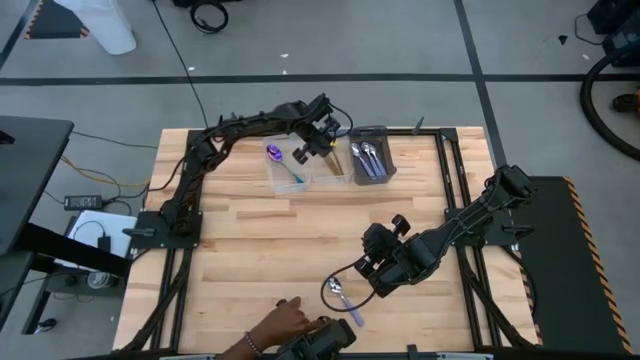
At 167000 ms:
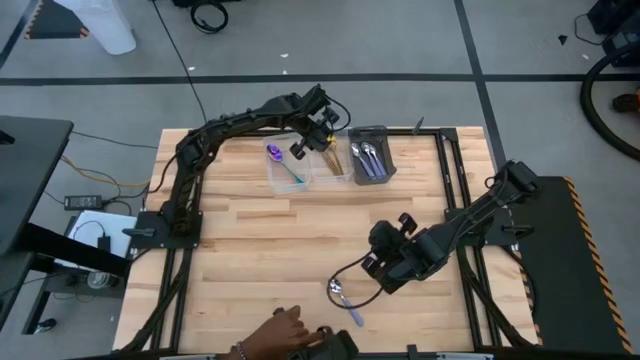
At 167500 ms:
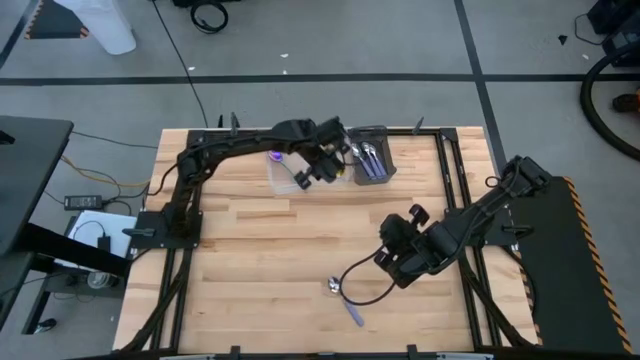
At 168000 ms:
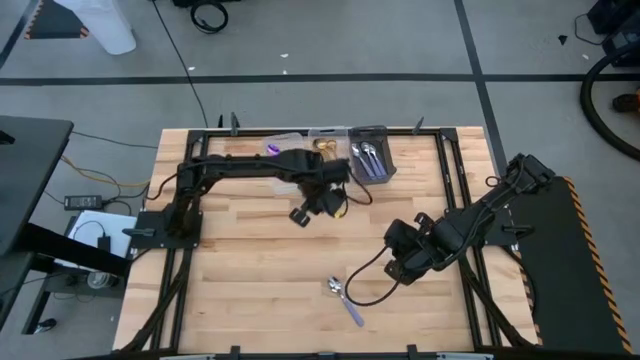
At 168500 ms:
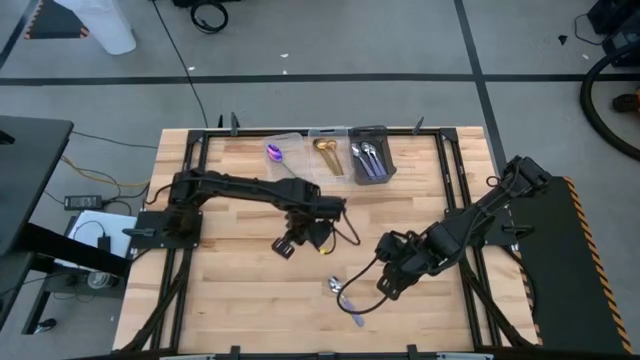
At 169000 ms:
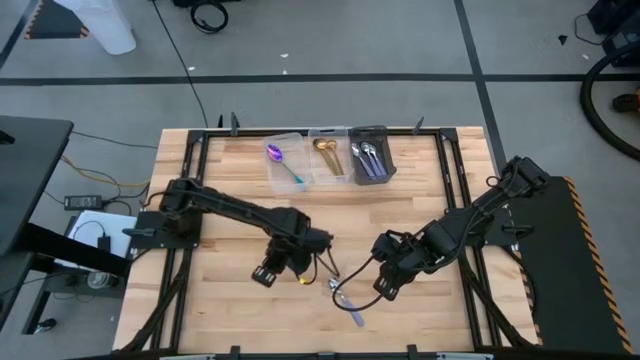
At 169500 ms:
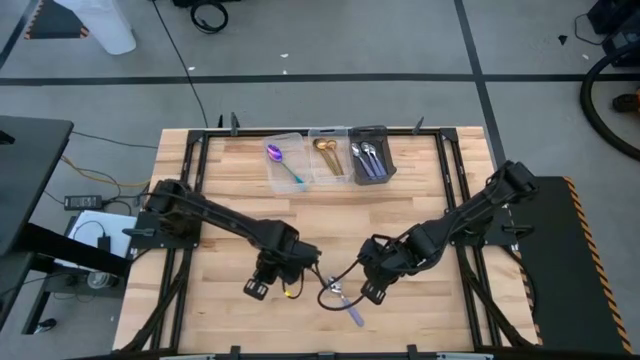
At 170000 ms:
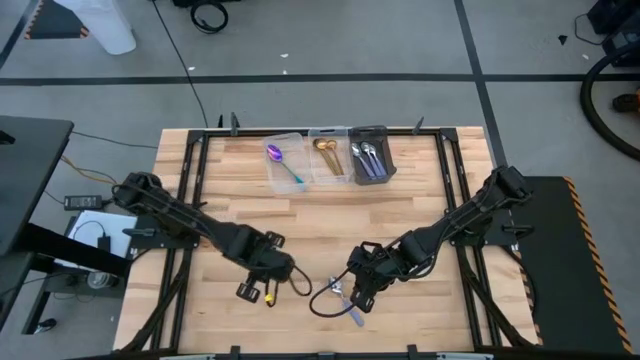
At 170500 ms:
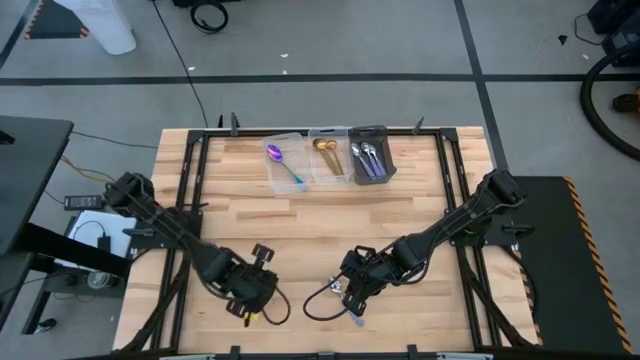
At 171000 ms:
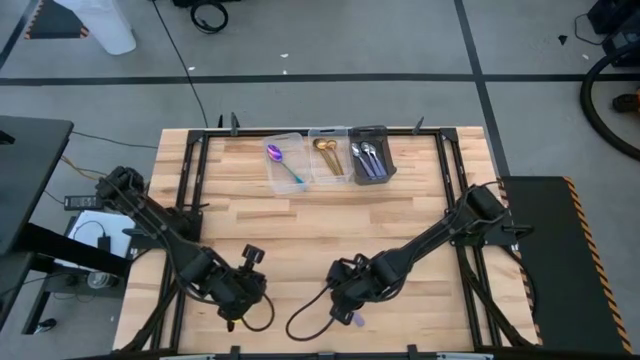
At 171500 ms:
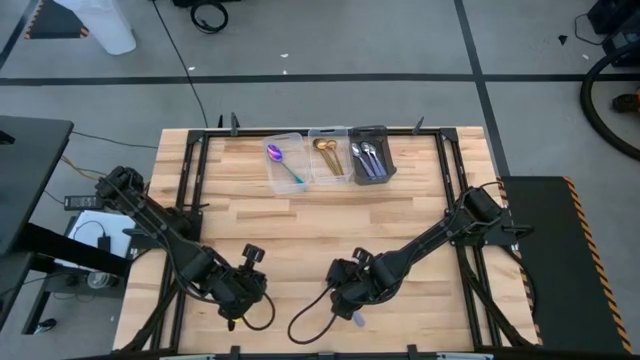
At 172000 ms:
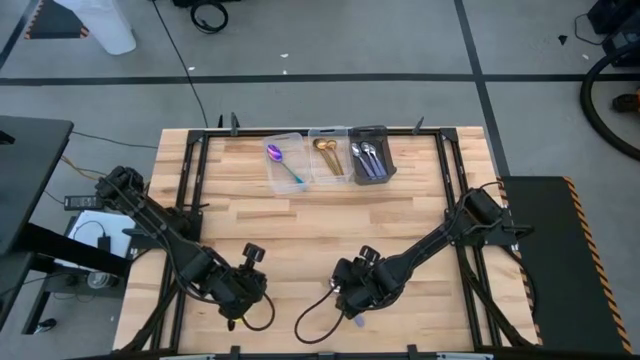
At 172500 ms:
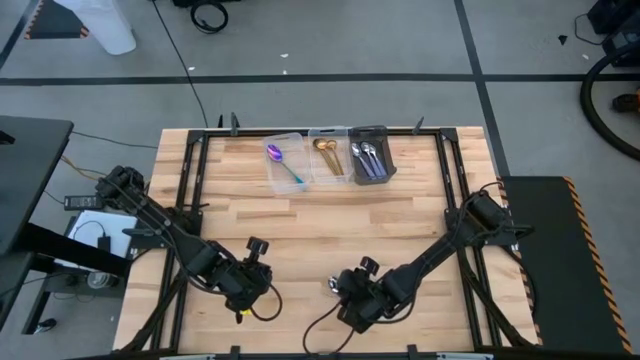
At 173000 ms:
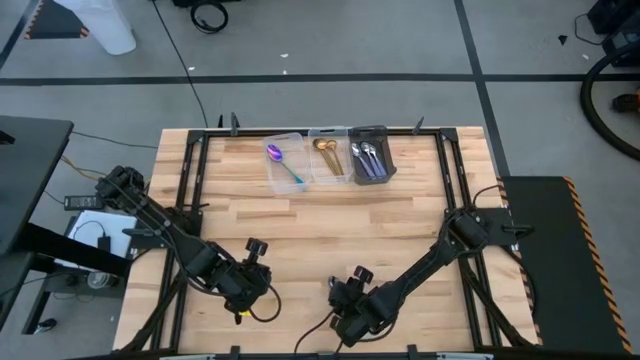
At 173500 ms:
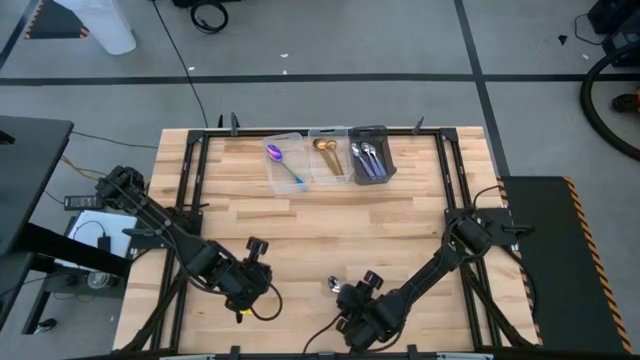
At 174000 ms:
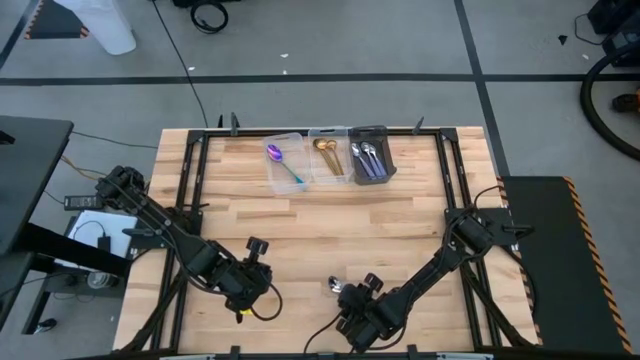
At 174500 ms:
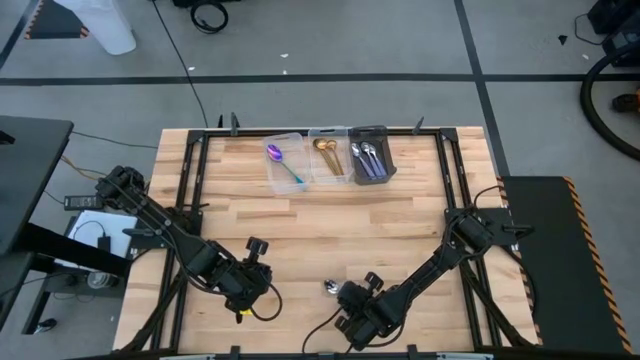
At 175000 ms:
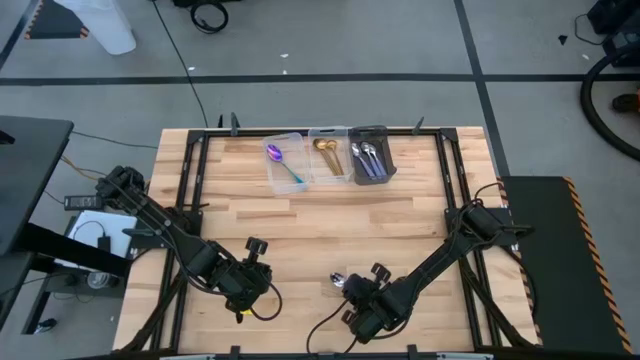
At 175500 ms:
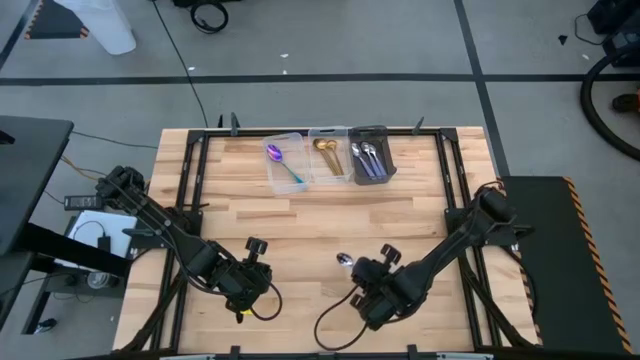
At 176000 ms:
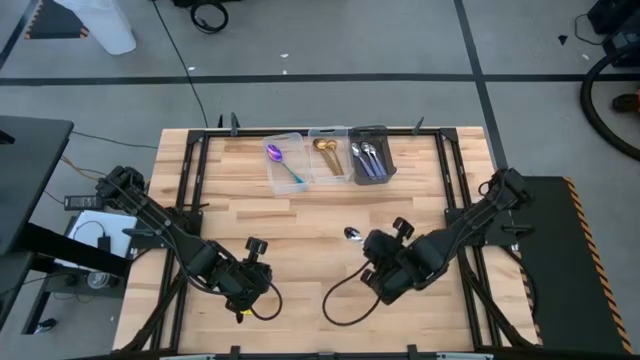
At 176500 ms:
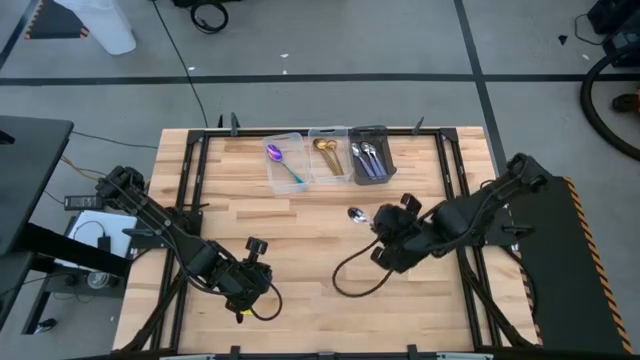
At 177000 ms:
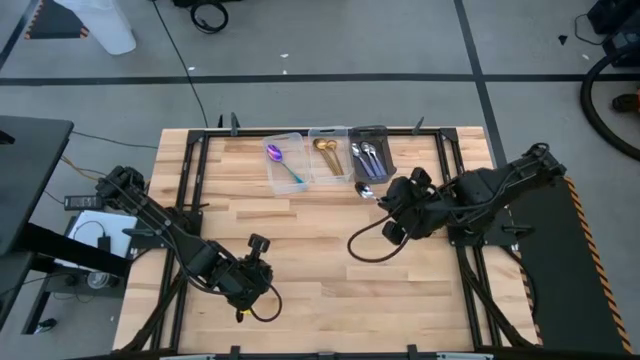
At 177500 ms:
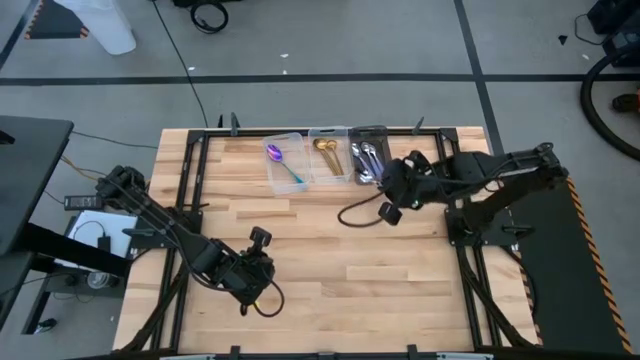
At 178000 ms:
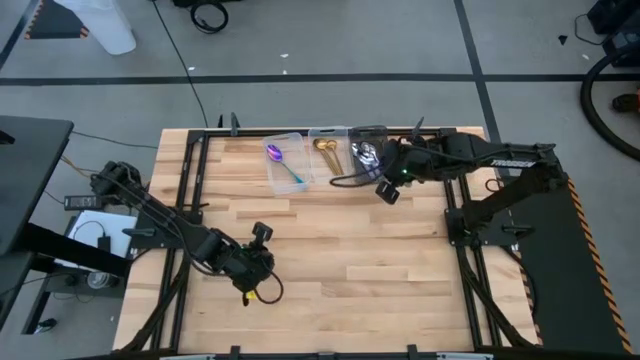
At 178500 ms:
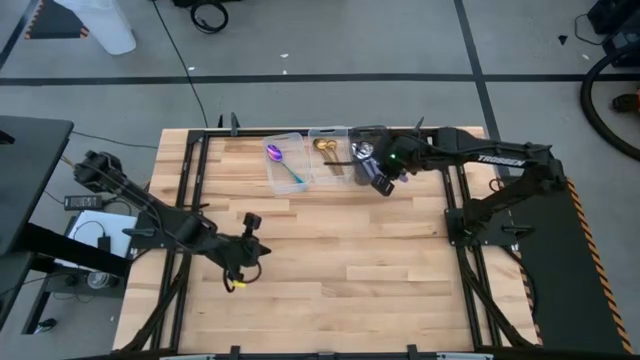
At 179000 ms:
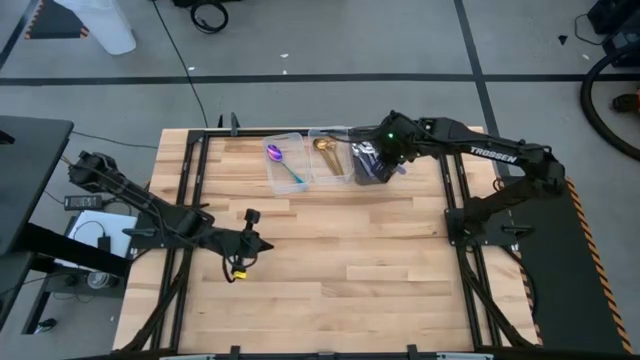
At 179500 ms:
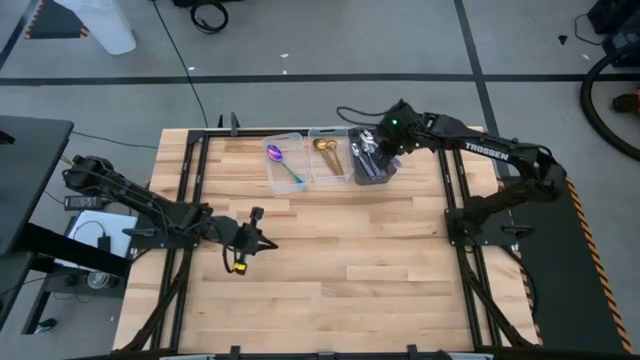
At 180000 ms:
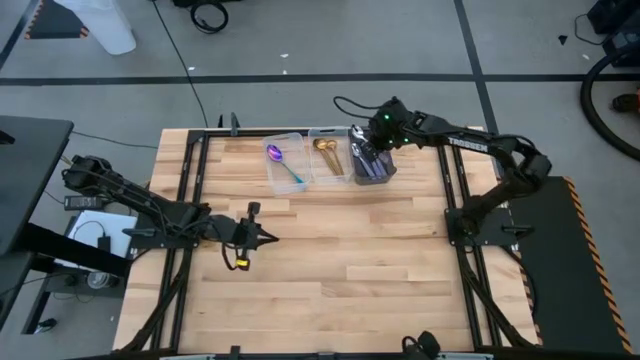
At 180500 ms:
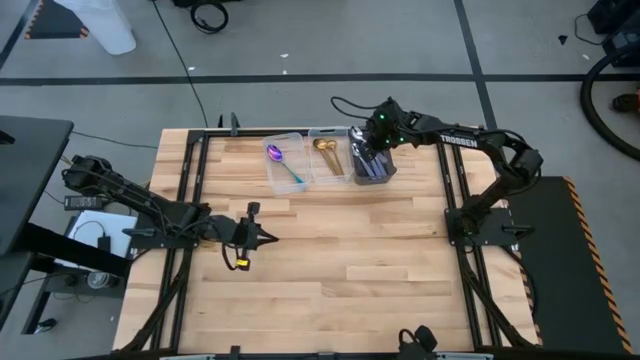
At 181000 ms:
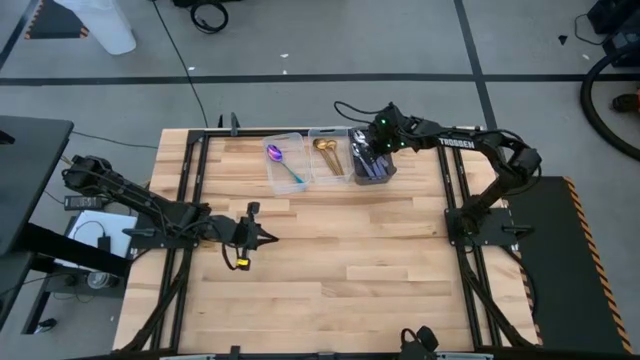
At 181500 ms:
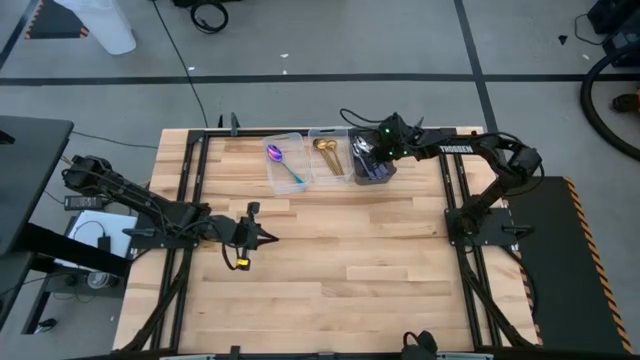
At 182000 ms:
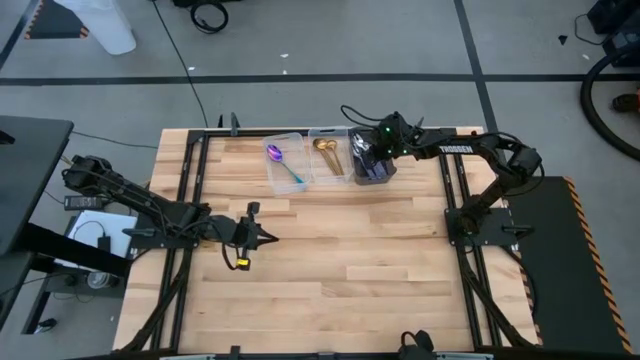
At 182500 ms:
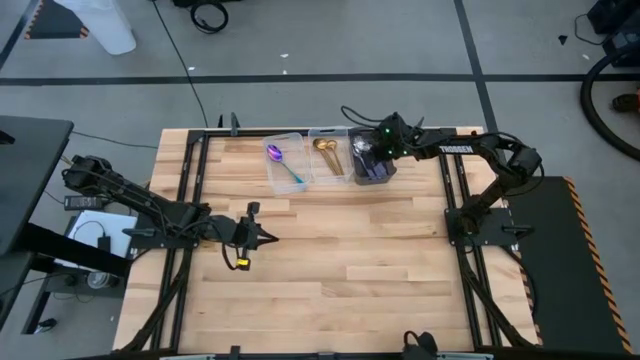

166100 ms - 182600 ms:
Task: Sort silverware by color (type)
Put the violet spoon into the black bin

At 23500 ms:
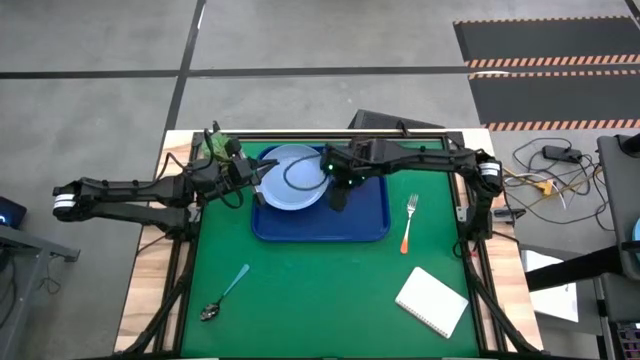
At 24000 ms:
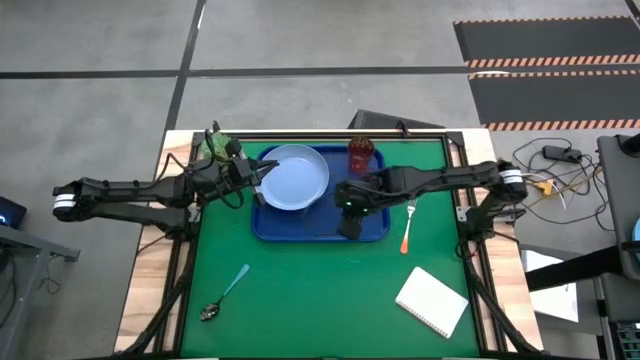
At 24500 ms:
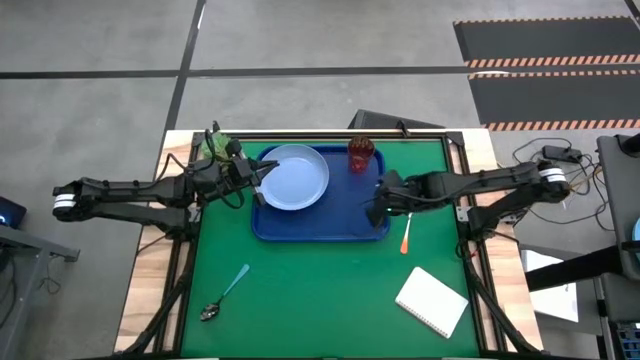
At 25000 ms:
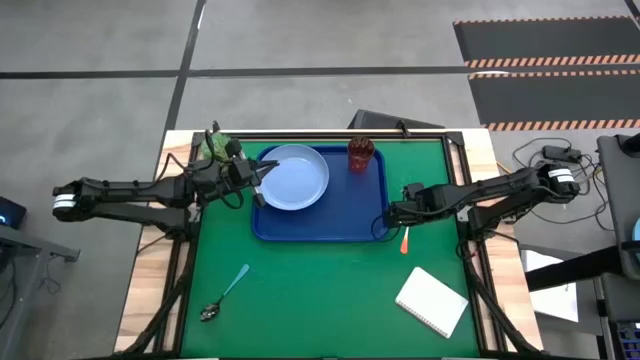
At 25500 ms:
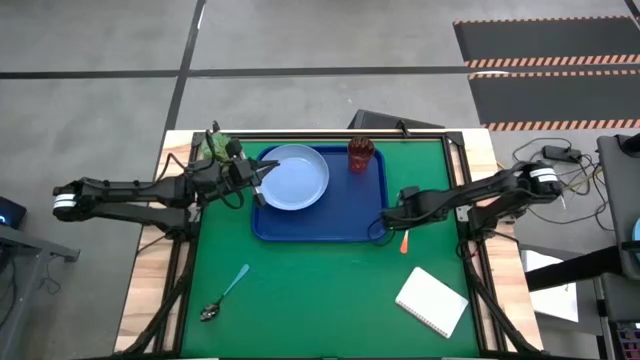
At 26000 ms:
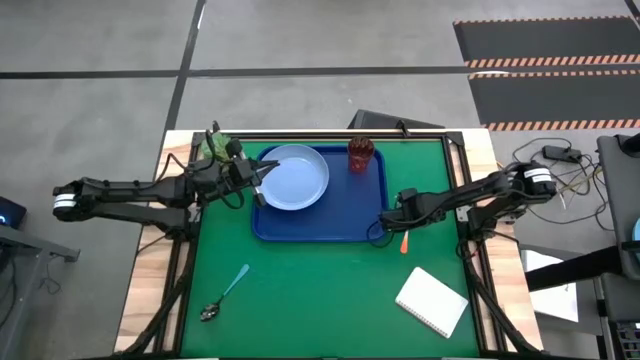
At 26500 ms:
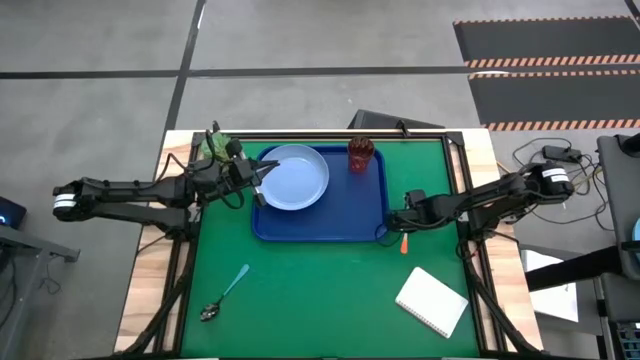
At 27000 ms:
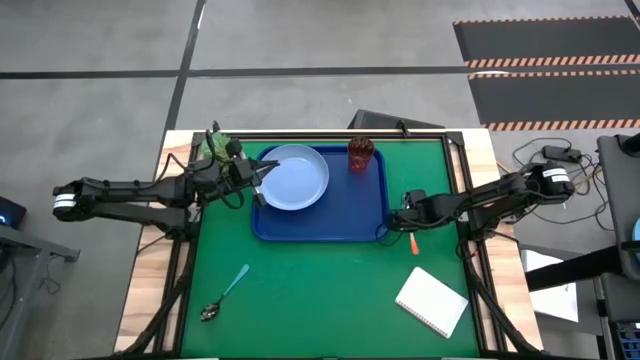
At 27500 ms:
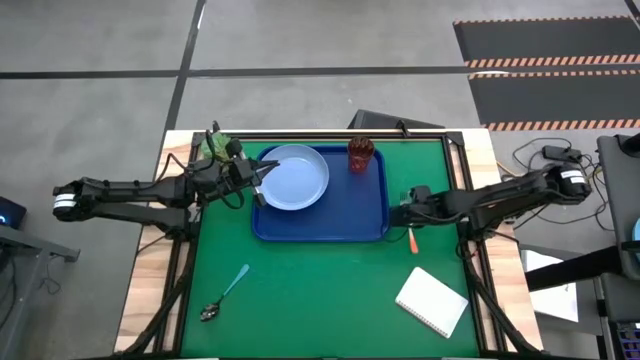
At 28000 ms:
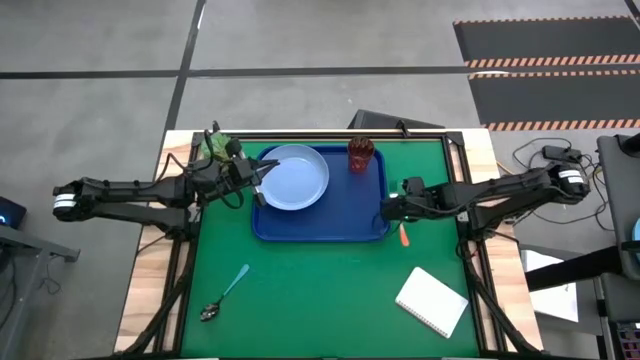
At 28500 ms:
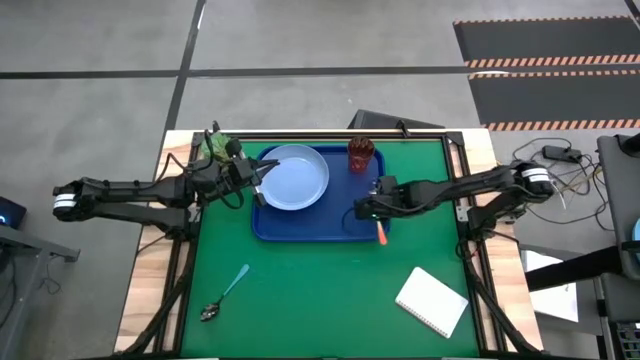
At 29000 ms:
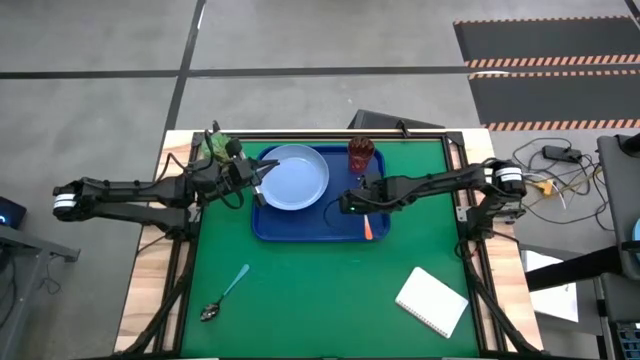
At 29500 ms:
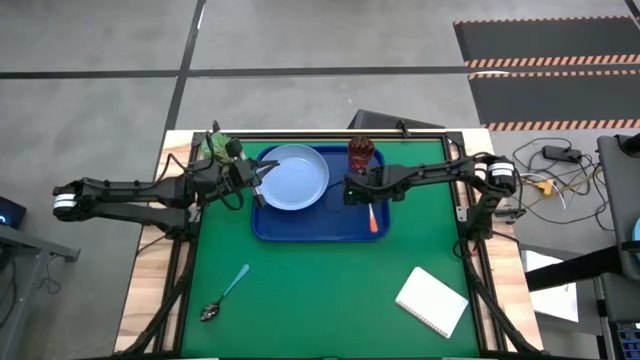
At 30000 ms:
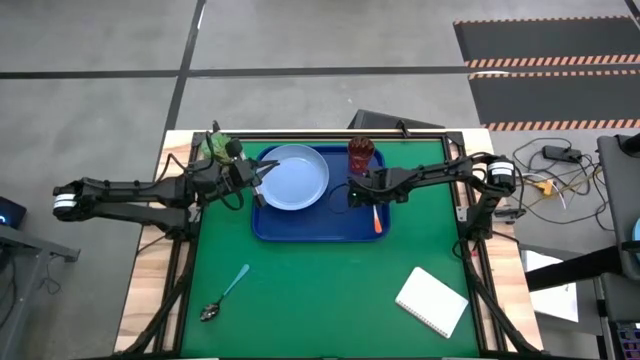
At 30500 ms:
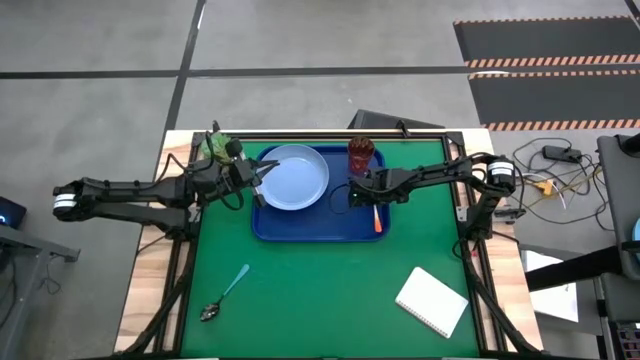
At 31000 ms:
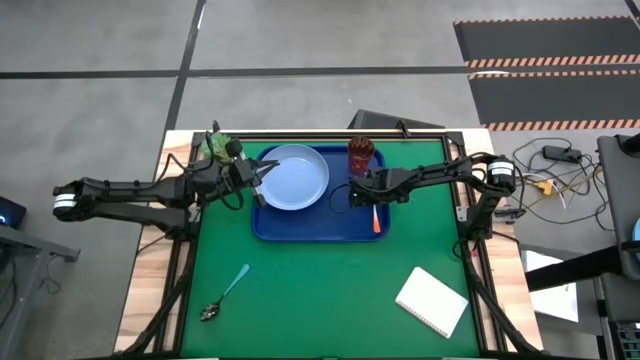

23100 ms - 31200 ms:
Task: Pick and place plate/cup/fork/spoon on tray
Put the orange fork on the blue serving tray
